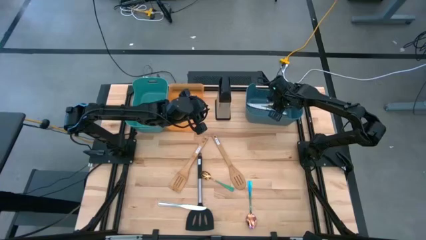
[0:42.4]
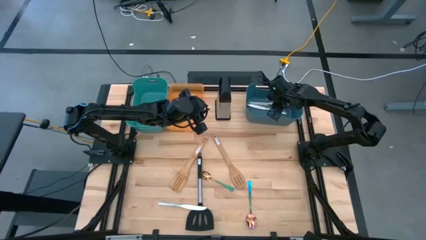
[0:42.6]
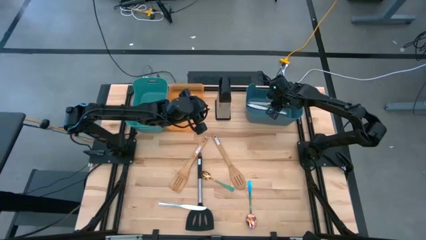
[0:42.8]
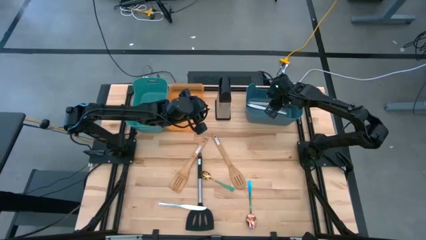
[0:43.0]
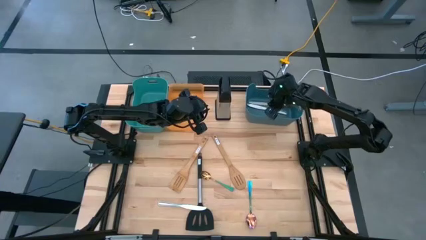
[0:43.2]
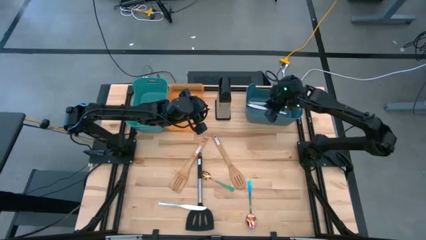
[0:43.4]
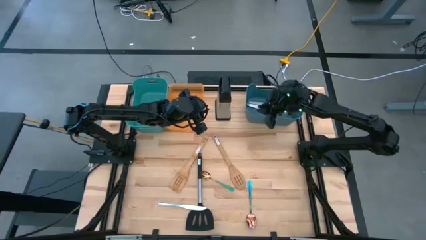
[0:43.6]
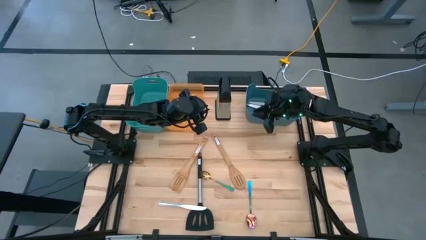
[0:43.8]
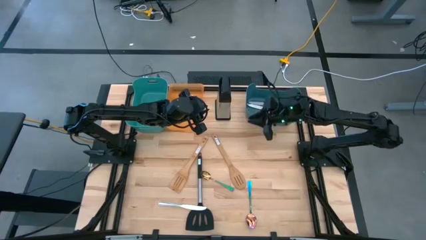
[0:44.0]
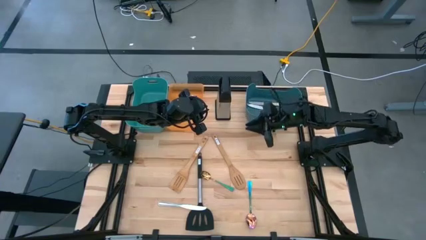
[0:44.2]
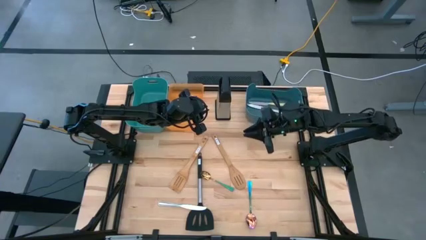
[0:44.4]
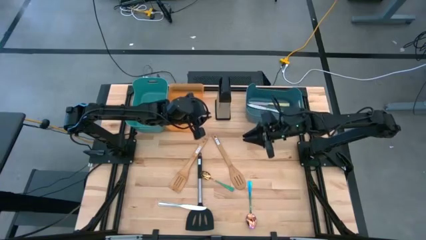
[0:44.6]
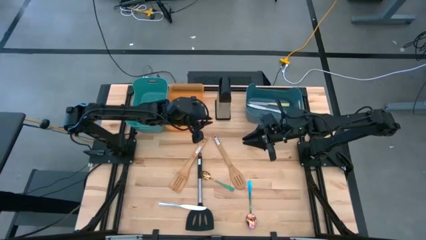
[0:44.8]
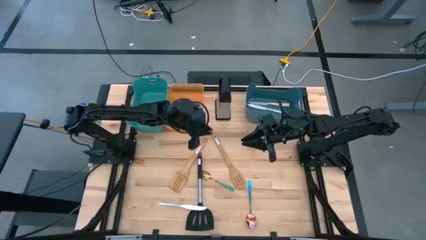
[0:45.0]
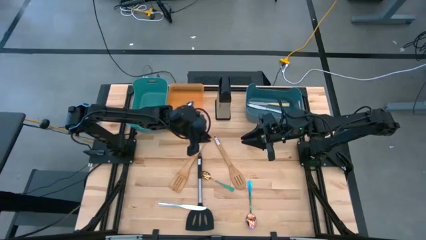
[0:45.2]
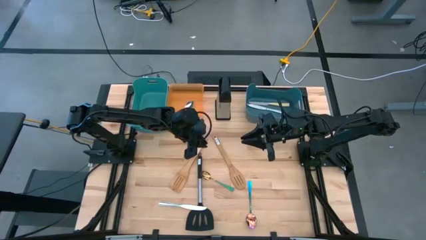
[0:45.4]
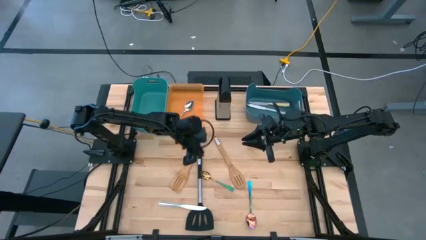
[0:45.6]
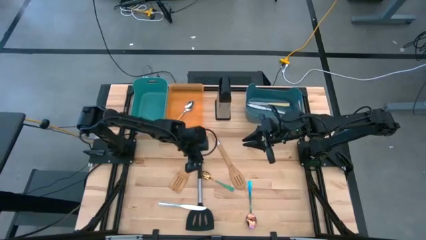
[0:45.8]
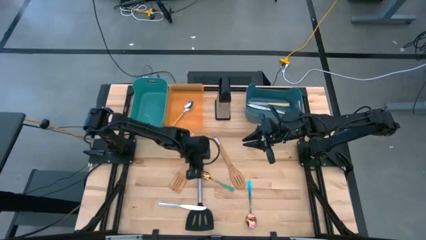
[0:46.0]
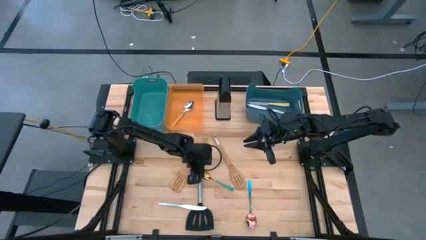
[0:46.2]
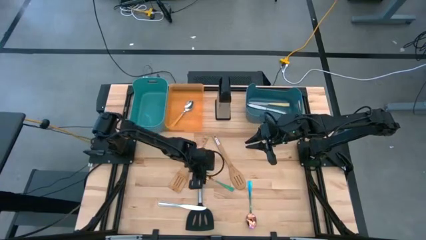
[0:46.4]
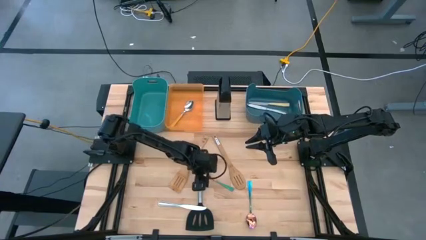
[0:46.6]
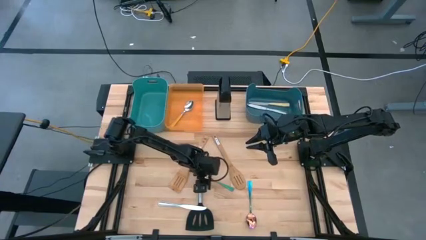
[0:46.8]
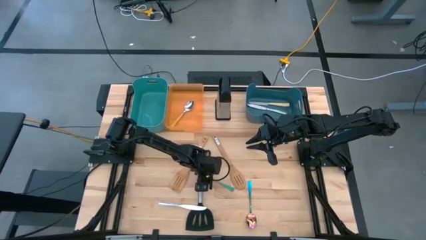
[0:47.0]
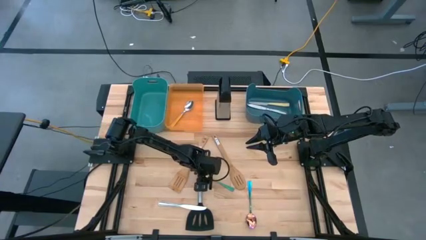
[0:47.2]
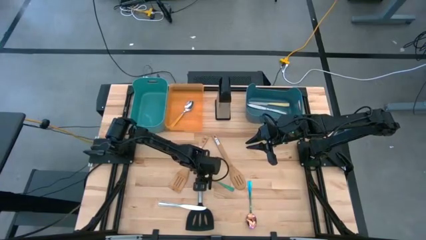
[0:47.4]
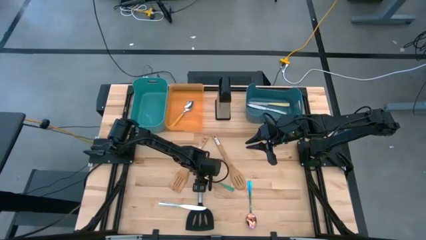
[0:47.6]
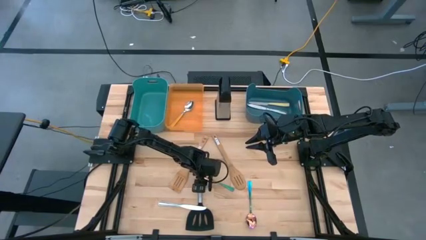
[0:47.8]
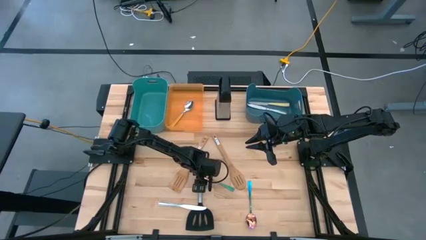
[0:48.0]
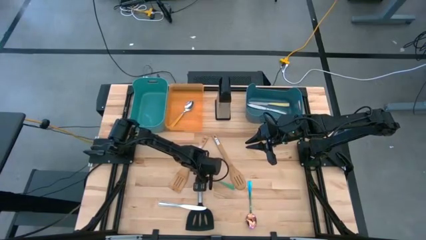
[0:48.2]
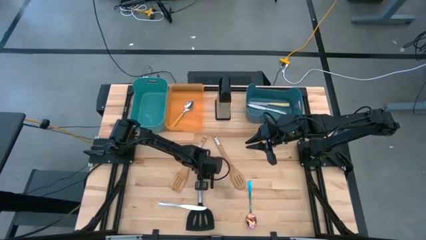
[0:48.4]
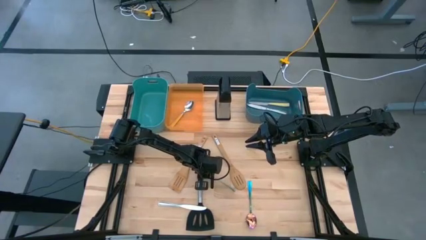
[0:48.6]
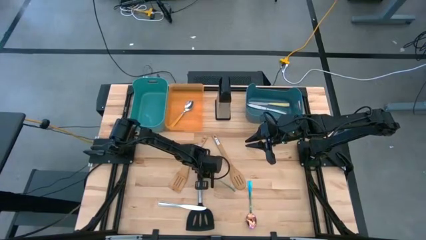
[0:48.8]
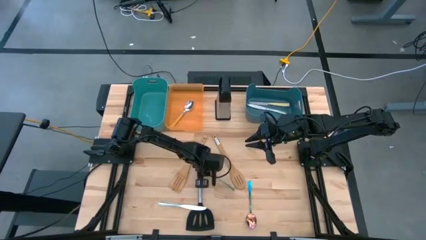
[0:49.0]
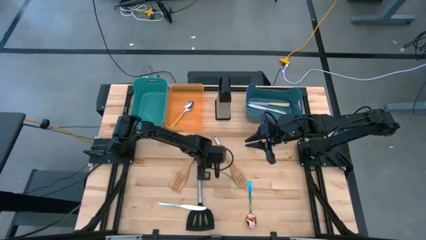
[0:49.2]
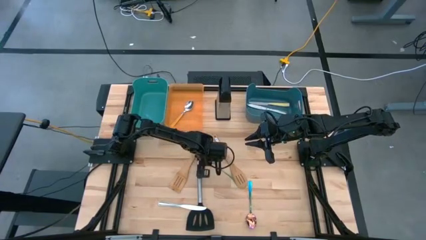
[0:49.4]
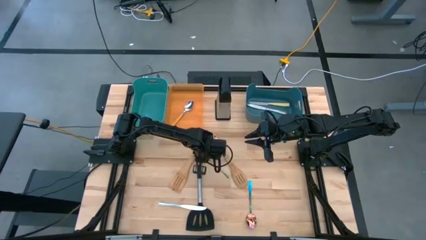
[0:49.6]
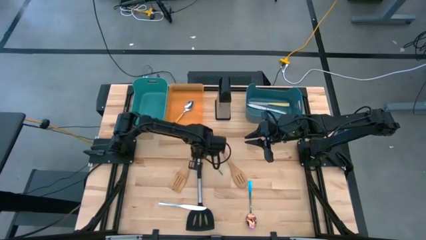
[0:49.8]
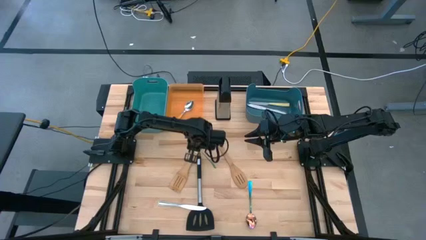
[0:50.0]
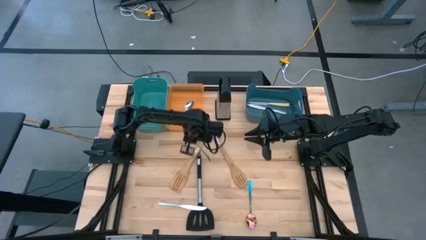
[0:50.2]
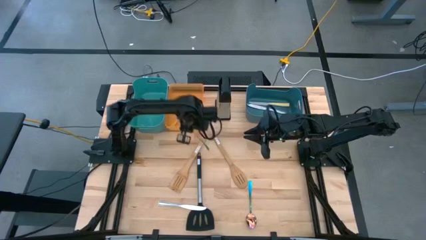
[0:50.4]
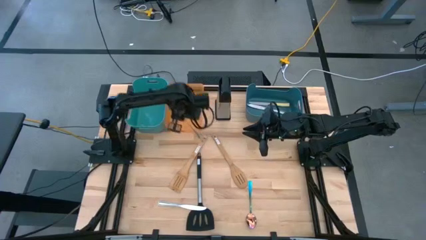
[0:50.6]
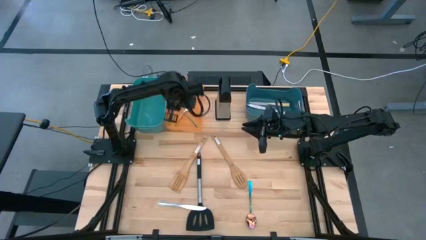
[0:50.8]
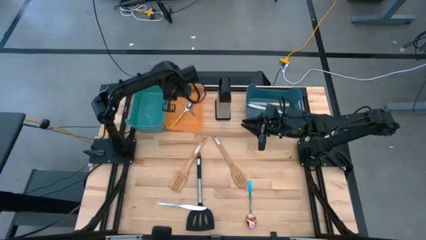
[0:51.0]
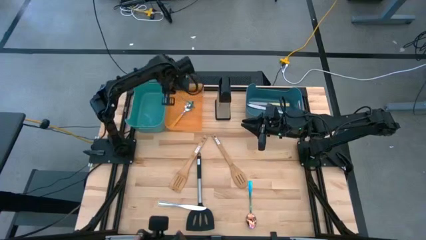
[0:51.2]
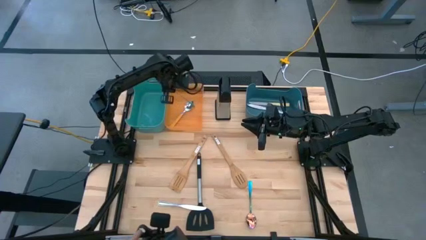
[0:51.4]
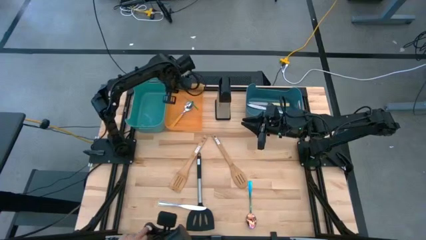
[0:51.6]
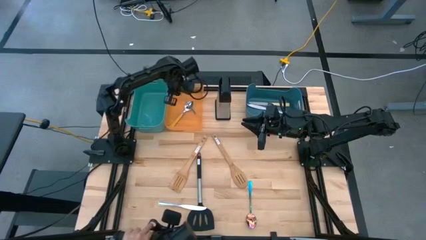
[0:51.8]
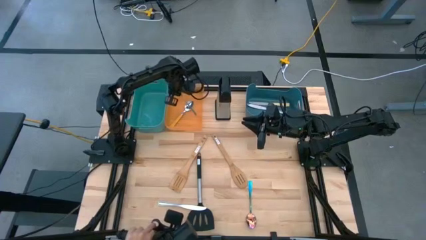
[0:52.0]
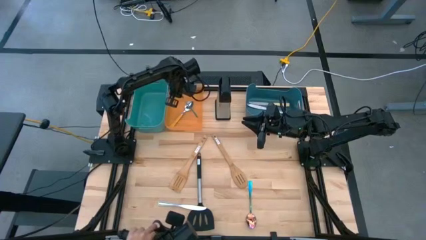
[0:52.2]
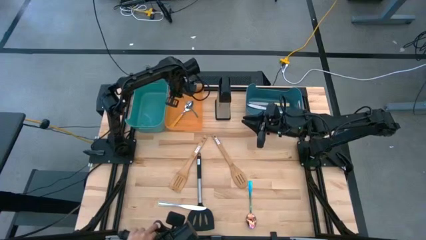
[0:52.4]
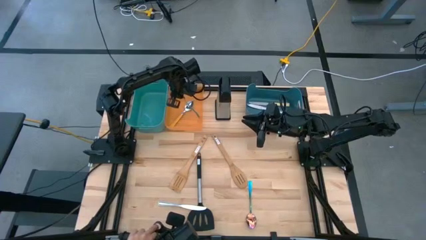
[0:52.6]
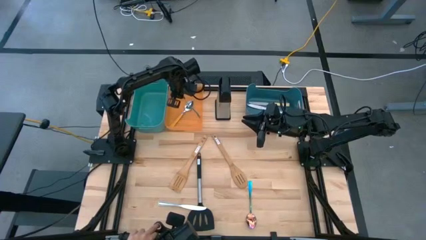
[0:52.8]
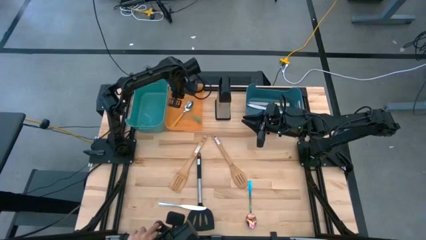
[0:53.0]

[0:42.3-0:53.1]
Task: Pick & Place Kitchen Items
Put the green spoon into the orange bin

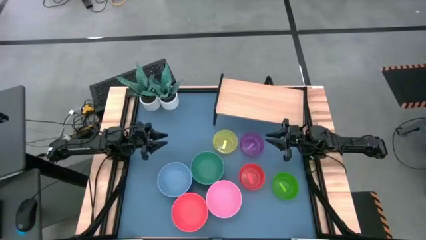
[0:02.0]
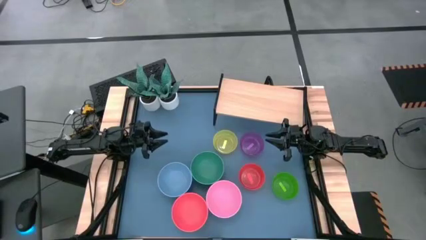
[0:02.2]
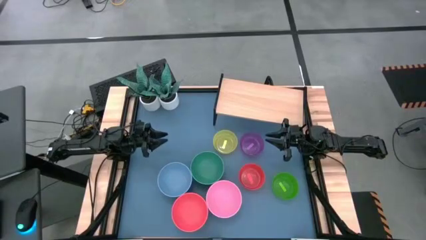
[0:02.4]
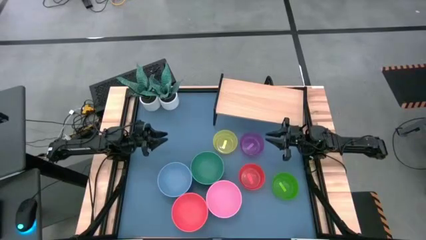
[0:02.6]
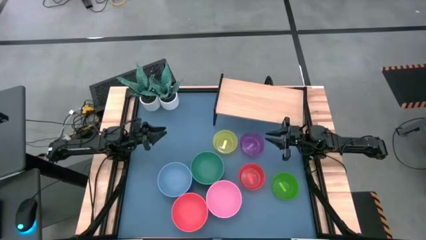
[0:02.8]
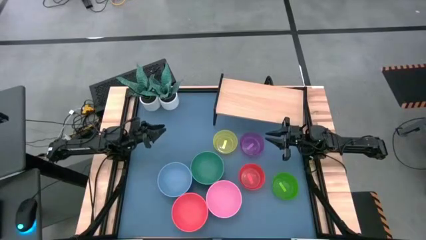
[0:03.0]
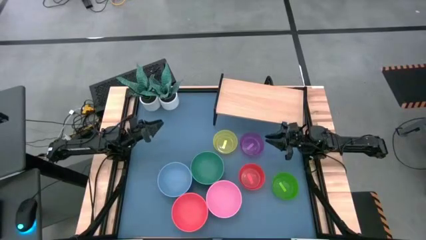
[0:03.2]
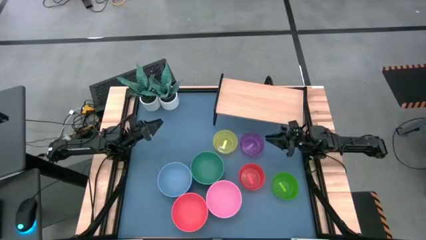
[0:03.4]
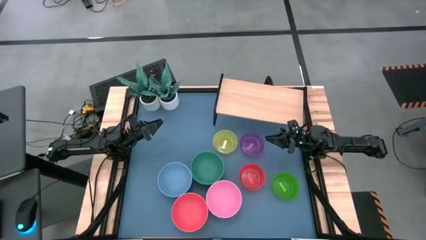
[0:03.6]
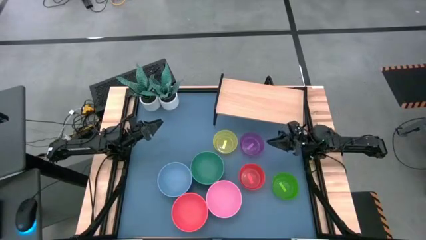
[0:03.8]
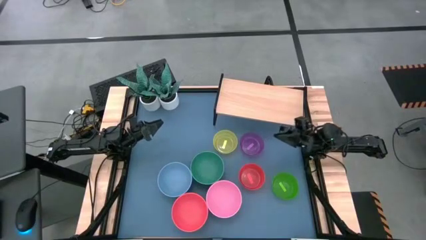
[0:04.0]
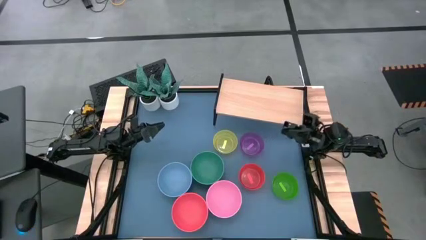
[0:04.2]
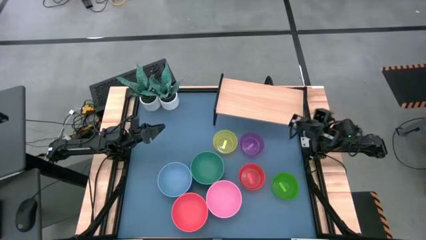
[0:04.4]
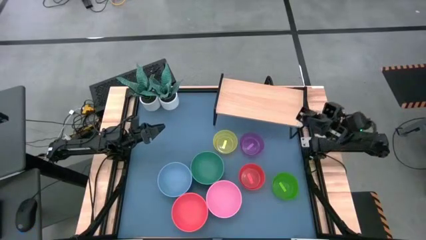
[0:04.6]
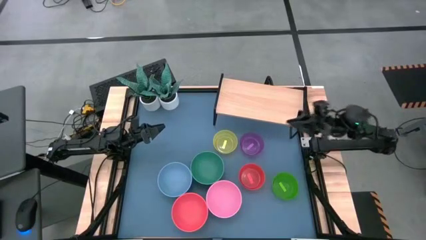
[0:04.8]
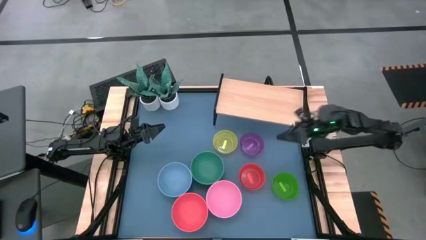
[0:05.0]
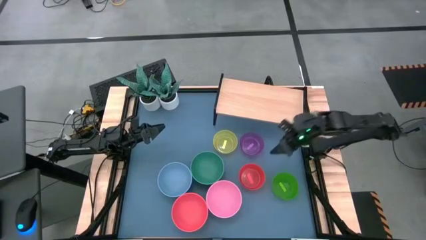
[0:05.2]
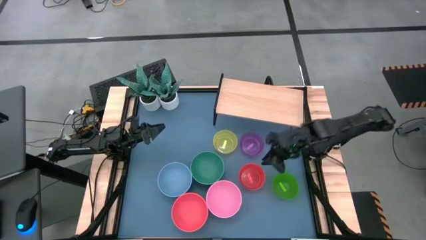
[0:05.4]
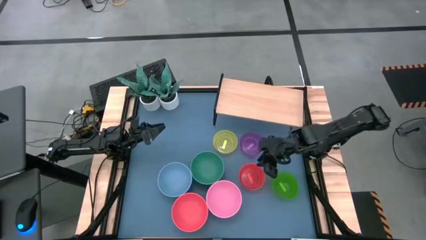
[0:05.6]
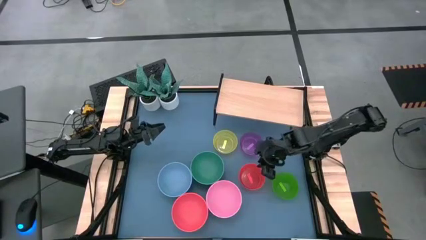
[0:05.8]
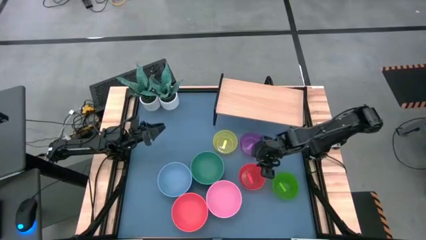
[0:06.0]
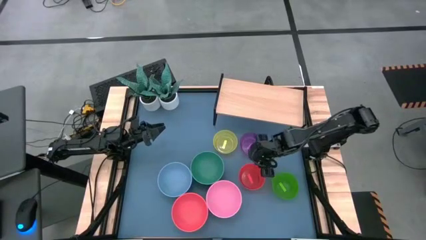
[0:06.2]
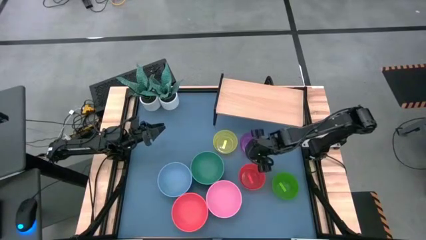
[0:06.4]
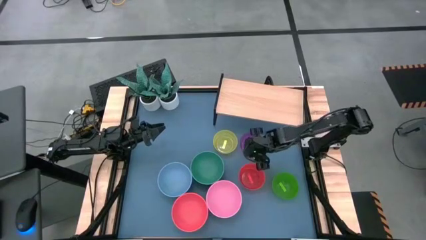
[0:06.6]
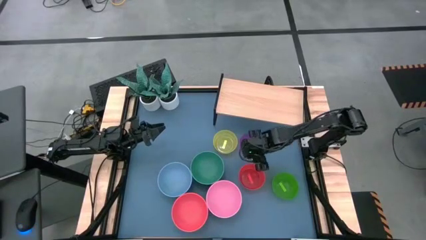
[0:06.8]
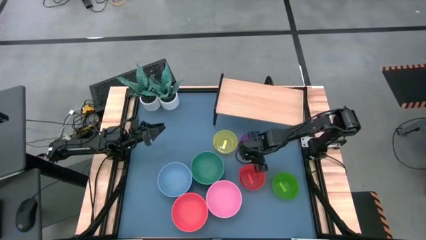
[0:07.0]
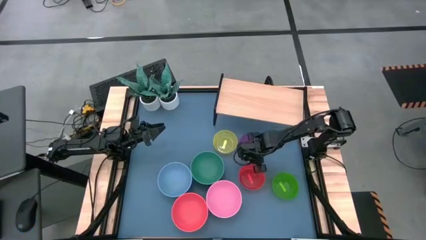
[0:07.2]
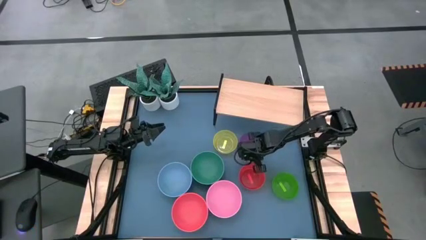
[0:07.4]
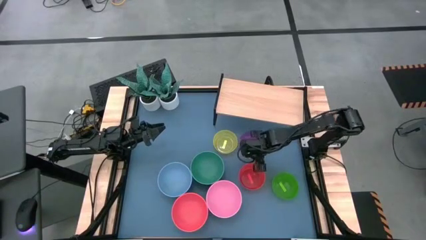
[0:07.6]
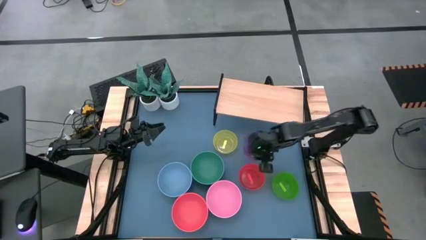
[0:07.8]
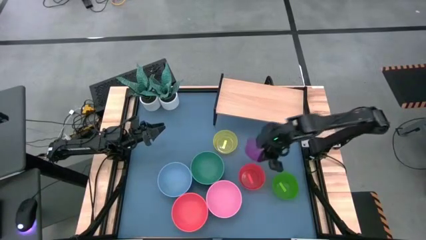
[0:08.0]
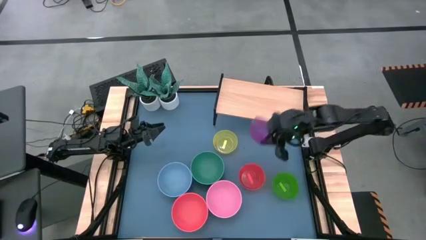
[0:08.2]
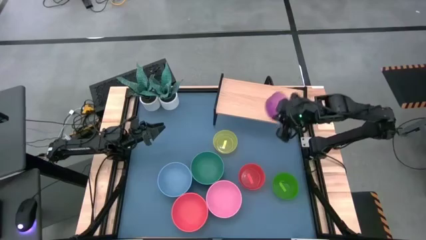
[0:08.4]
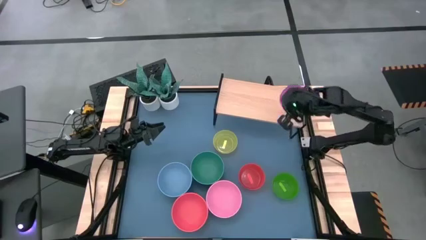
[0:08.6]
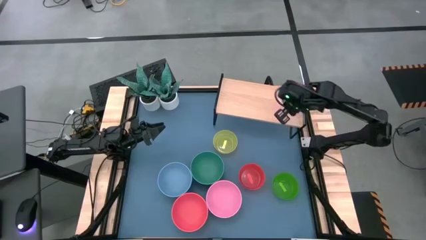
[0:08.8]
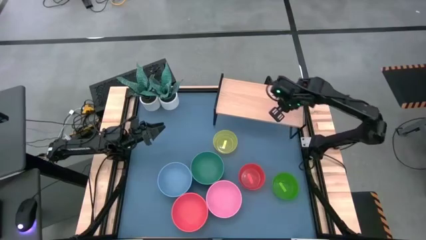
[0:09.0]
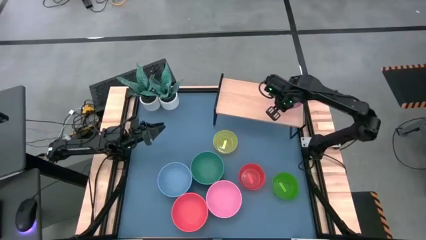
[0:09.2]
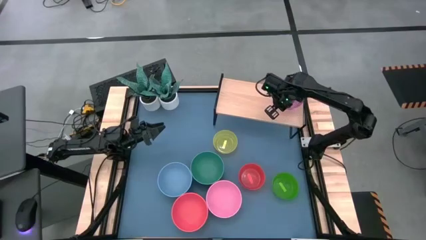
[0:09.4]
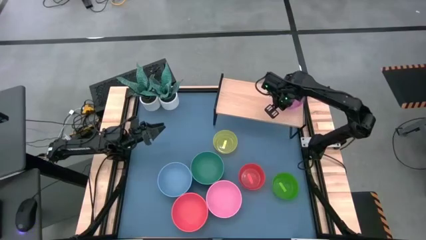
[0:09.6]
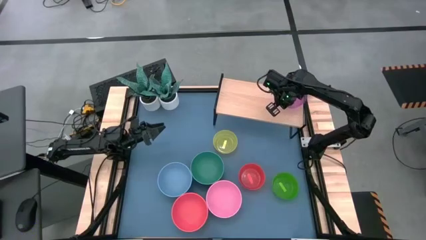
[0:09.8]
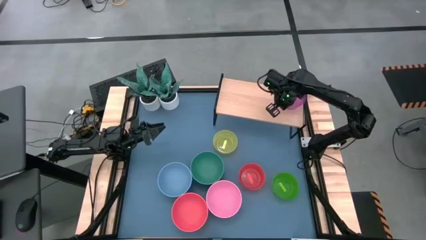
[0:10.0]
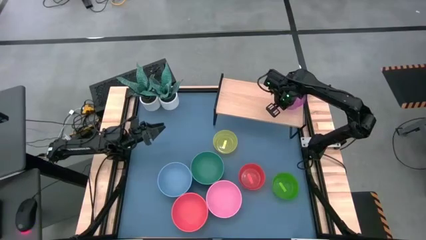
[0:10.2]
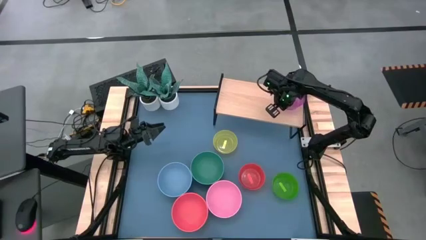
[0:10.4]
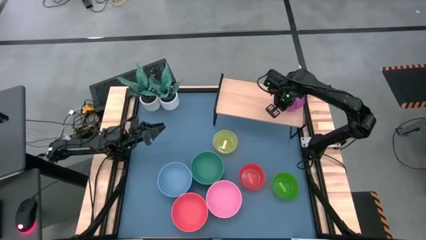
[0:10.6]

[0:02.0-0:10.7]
Task: Place and stack bowls onto a shelf
Put the small violet bowl on the shelf
